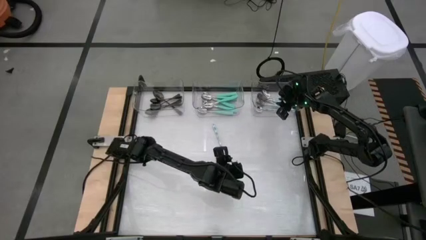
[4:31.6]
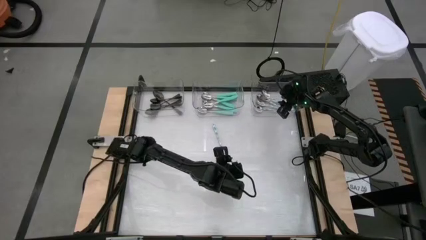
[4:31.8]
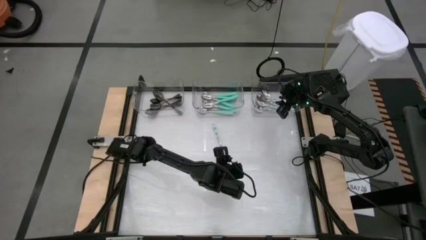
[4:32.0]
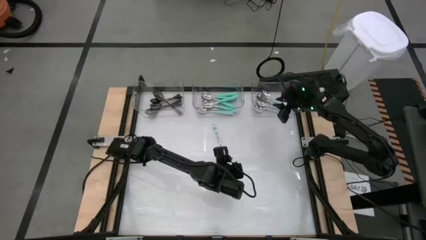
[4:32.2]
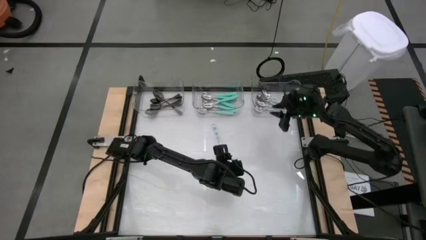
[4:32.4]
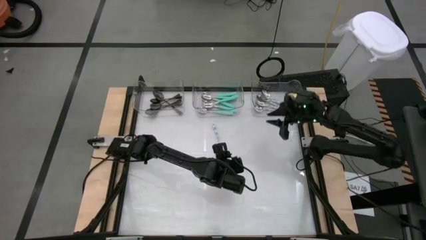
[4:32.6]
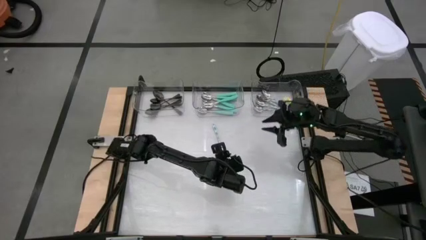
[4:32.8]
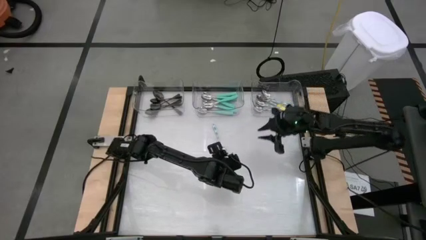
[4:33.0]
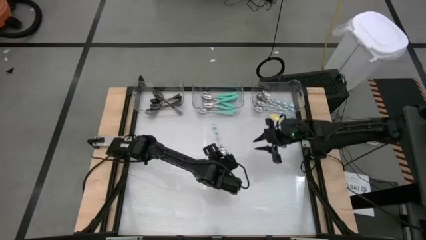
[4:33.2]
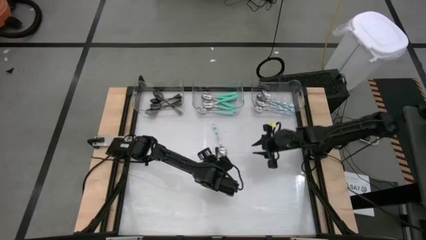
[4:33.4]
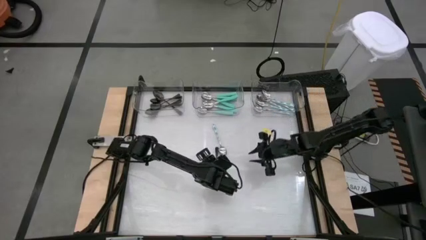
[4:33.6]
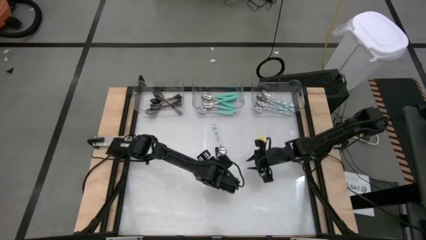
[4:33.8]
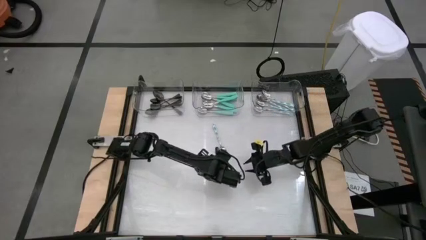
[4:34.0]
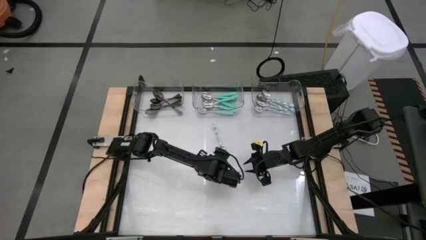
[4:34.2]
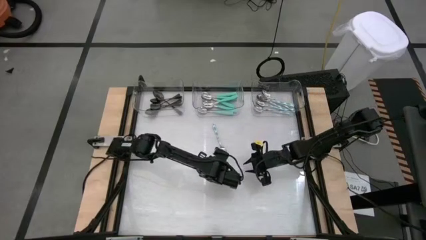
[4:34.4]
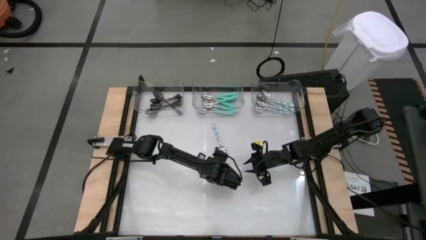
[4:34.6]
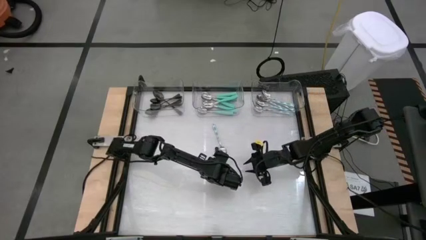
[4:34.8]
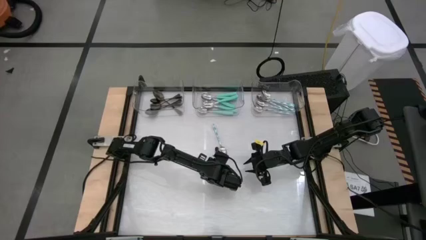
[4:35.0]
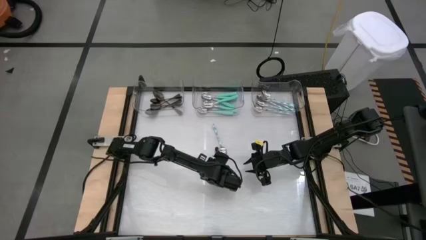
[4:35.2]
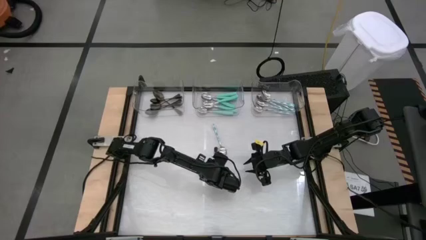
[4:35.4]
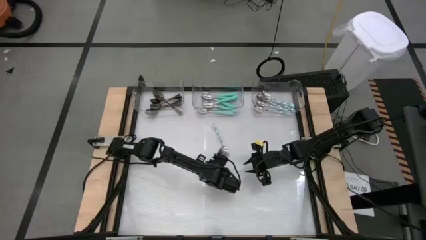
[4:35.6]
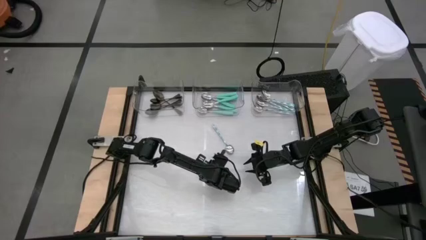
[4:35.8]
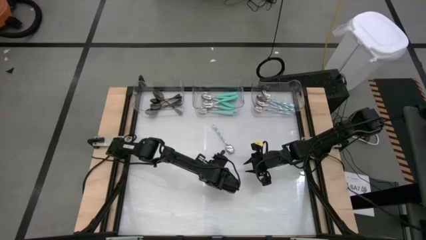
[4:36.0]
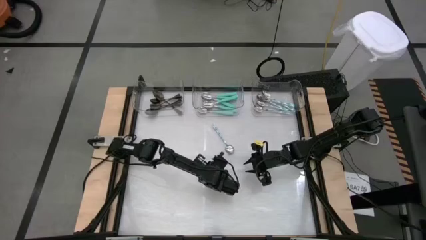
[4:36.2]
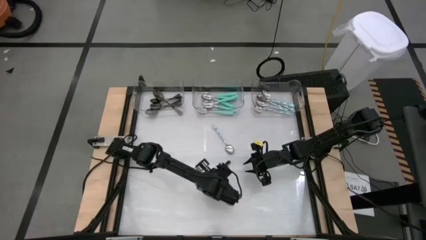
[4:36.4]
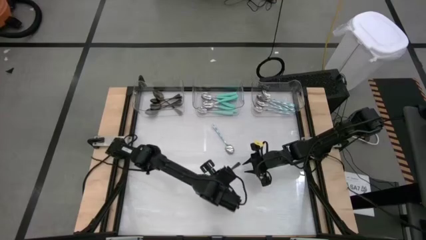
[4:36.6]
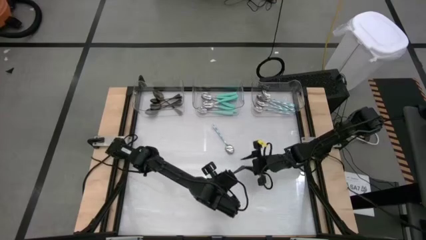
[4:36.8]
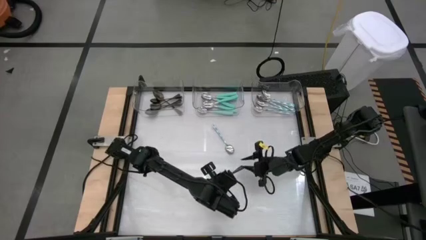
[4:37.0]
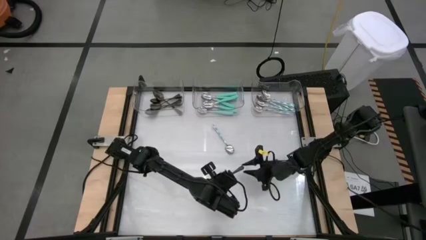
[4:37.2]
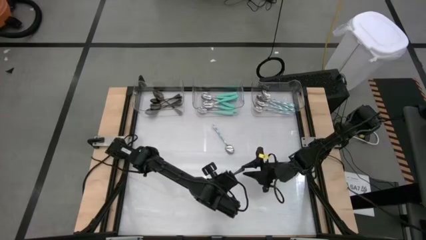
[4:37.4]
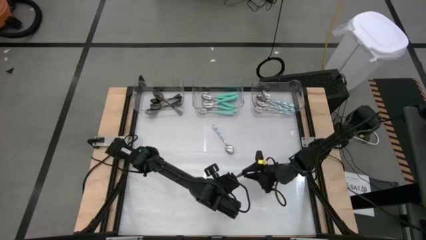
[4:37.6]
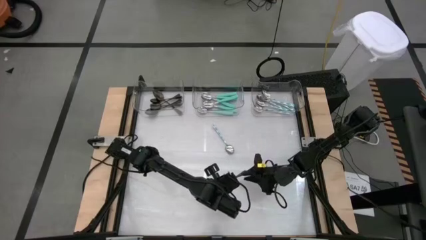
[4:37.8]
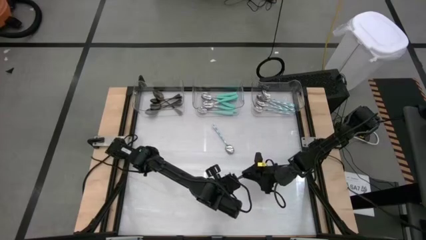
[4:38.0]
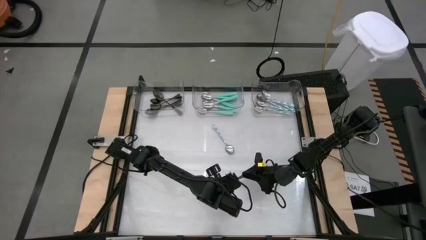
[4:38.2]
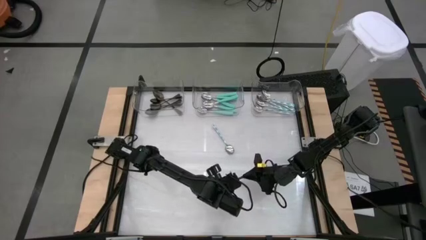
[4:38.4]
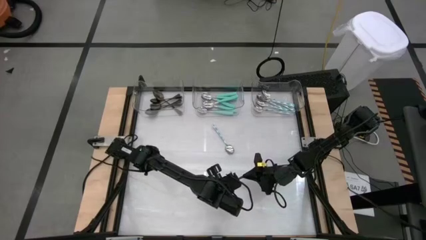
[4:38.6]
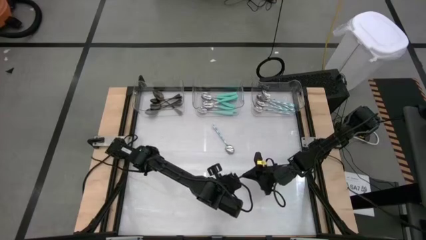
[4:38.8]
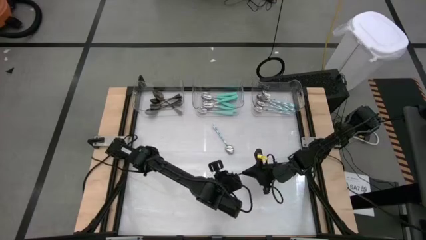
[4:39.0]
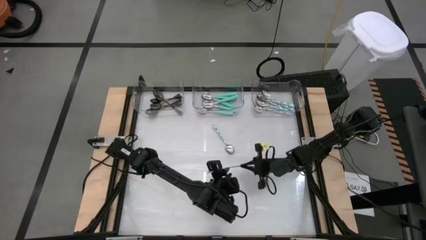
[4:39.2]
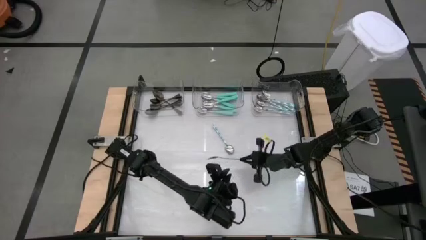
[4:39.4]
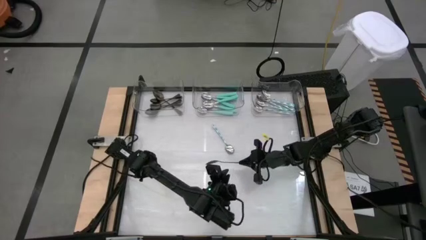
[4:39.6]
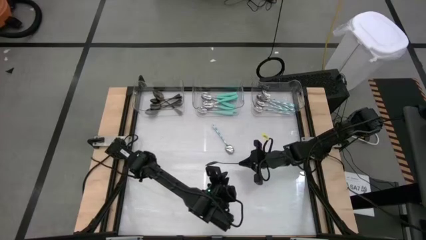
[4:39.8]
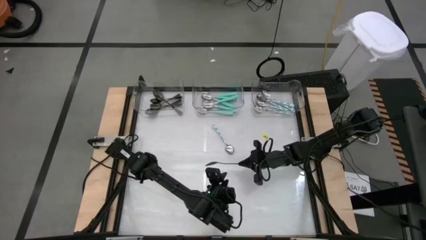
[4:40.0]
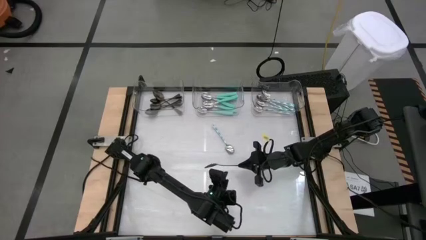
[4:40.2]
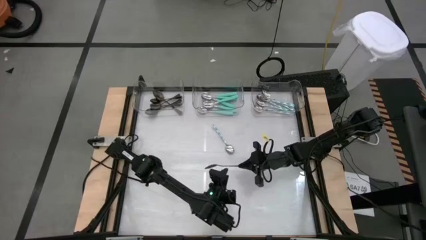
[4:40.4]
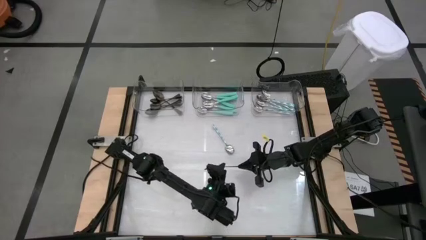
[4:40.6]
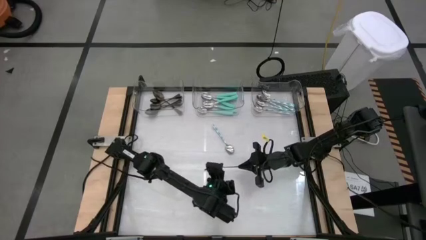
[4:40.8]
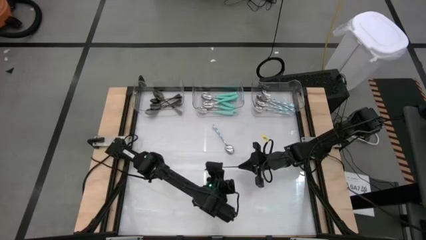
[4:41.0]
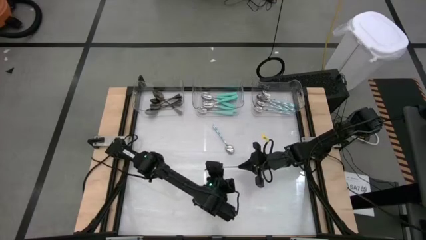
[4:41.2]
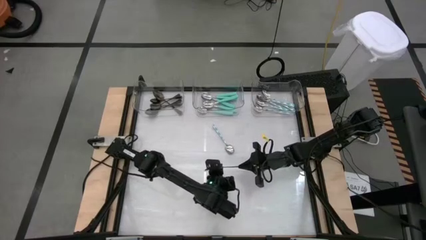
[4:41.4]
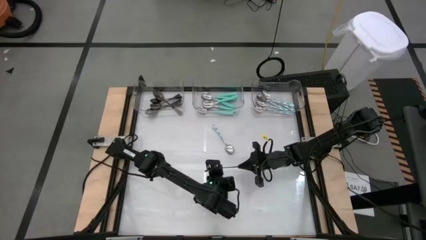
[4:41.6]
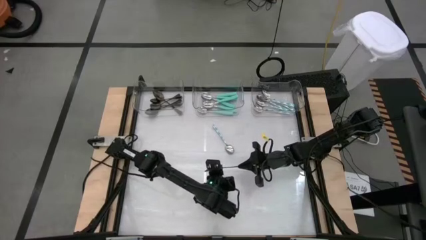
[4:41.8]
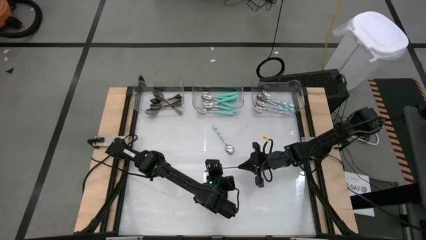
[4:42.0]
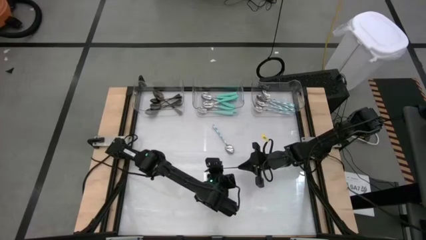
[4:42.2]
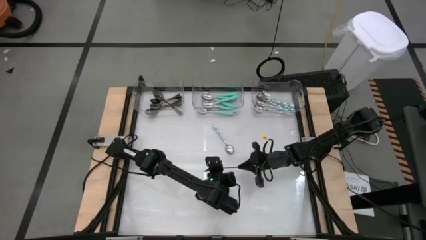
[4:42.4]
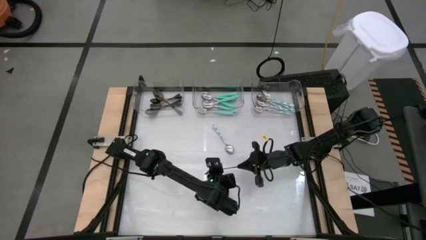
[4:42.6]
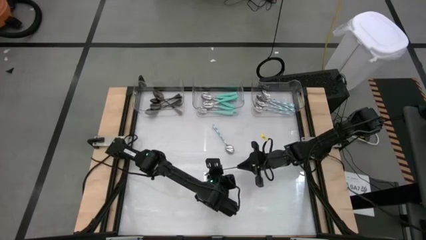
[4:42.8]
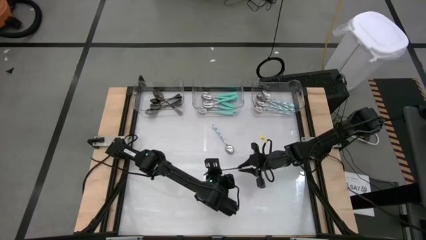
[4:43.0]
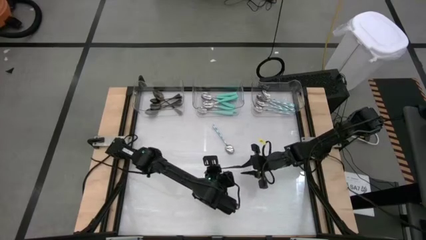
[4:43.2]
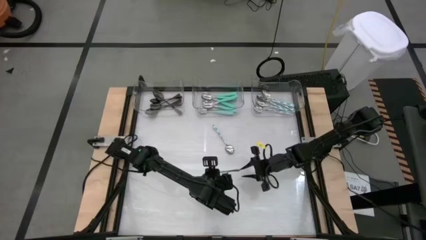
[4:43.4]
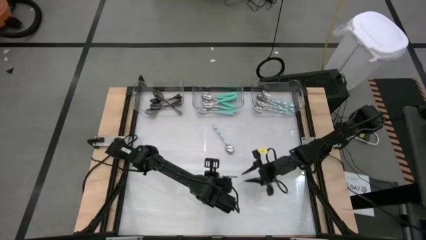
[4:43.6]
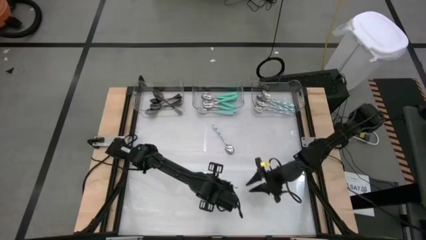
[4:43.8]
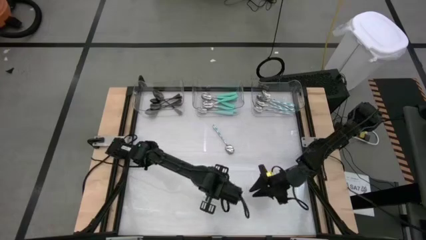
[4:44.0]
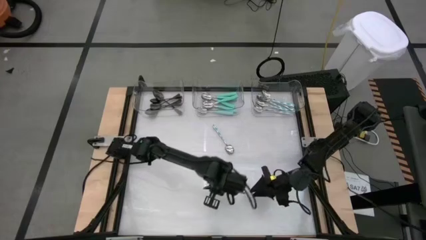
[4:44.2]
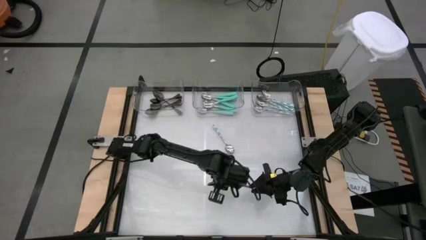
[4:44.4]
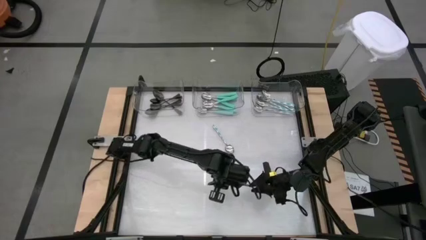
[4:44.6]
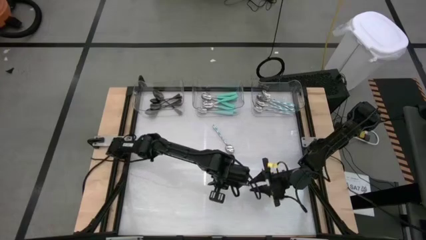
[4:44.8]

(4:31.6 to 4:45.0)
Task: Sort silverware by color (type)
Put the black spoon into the left transparent bin
